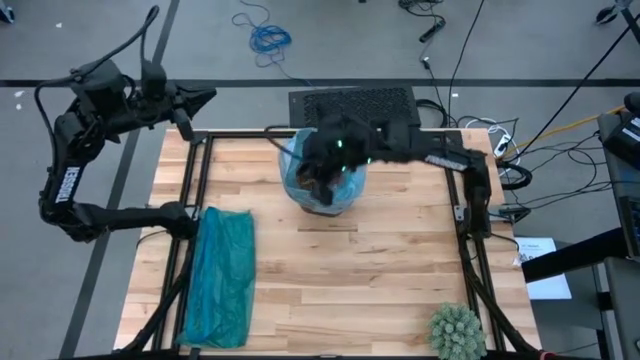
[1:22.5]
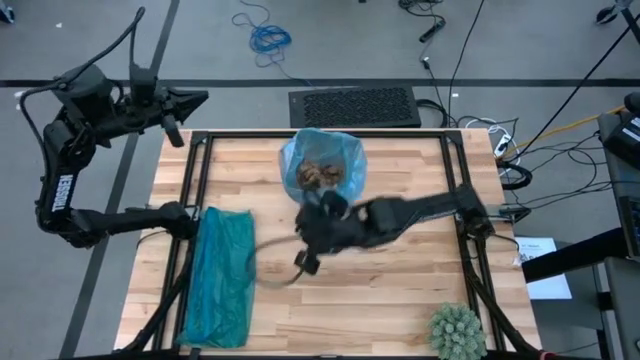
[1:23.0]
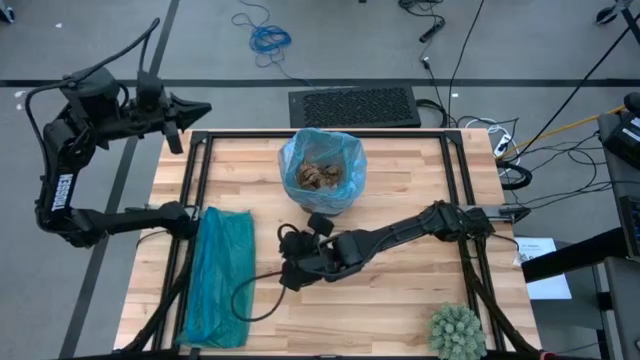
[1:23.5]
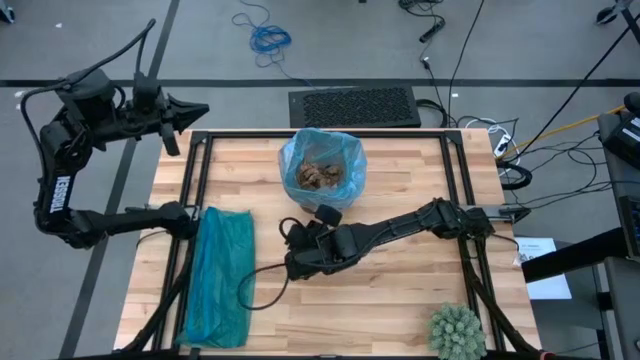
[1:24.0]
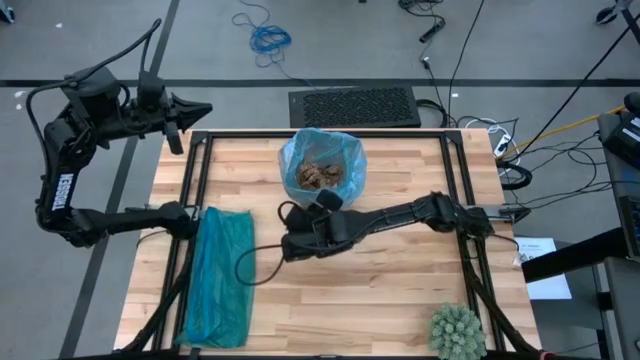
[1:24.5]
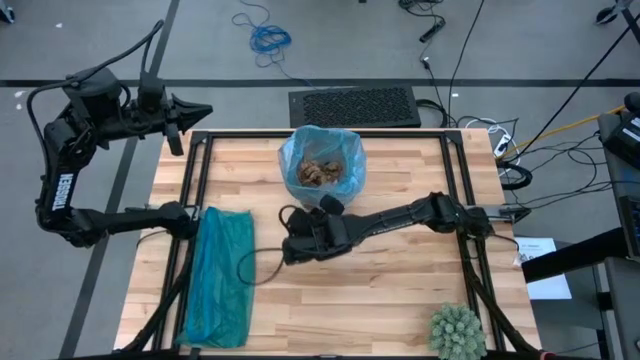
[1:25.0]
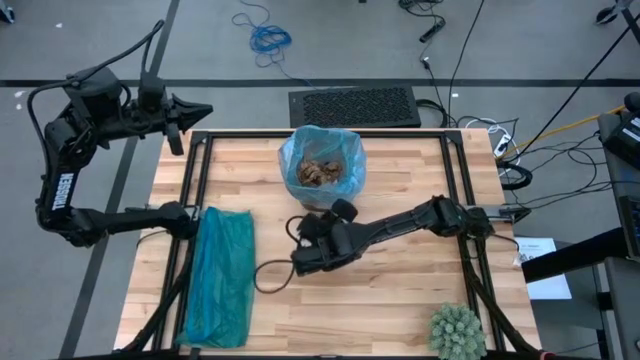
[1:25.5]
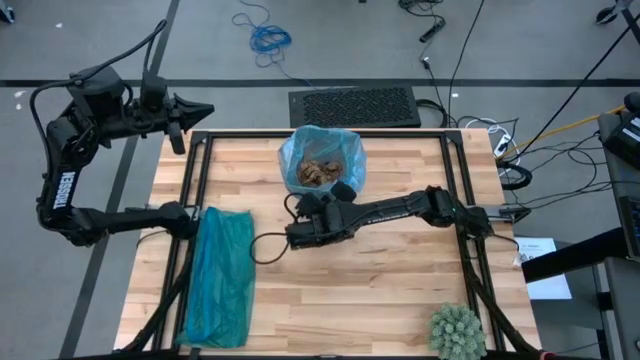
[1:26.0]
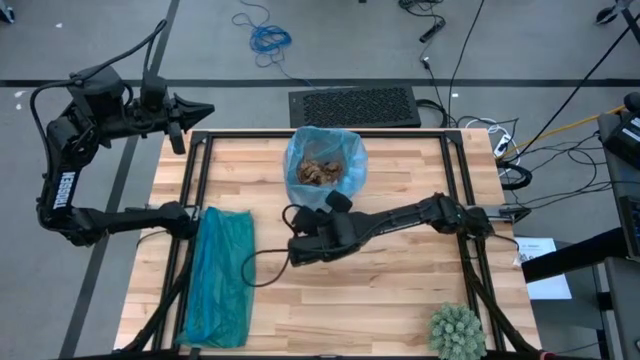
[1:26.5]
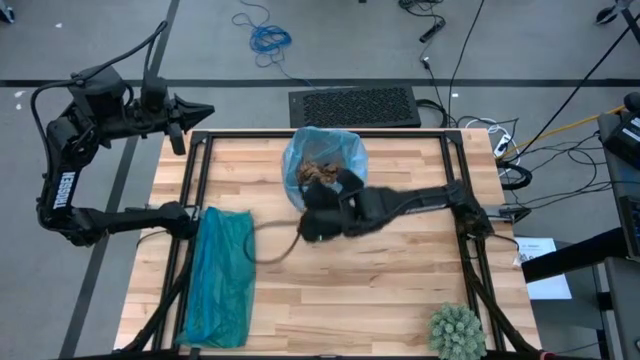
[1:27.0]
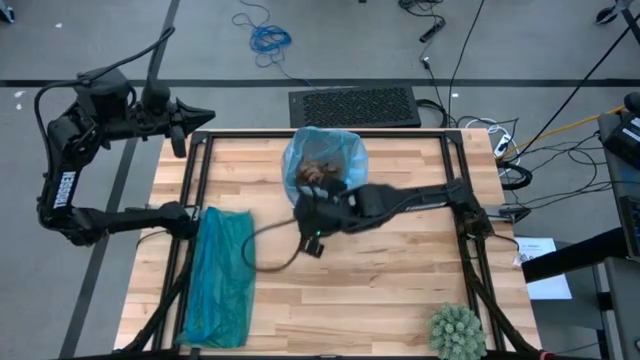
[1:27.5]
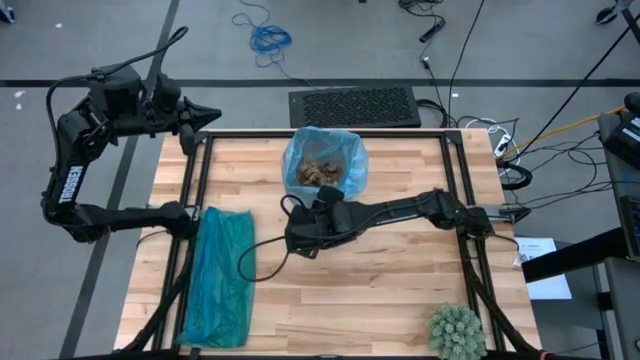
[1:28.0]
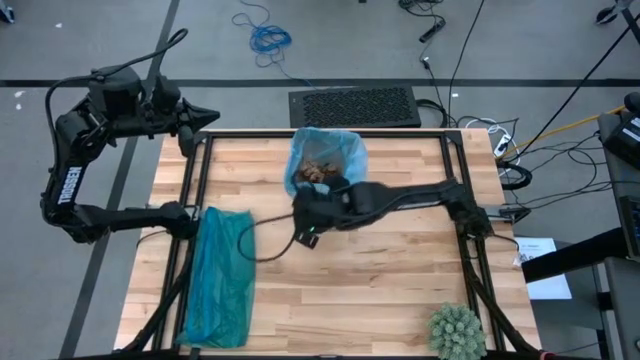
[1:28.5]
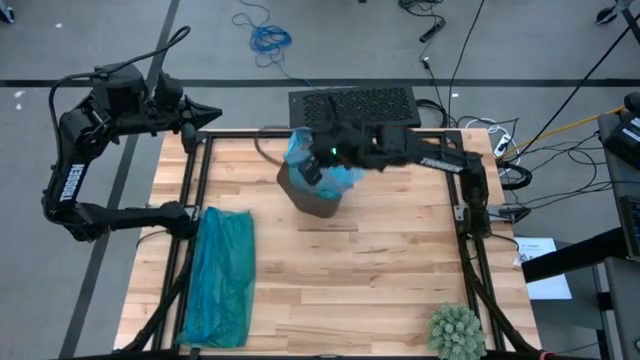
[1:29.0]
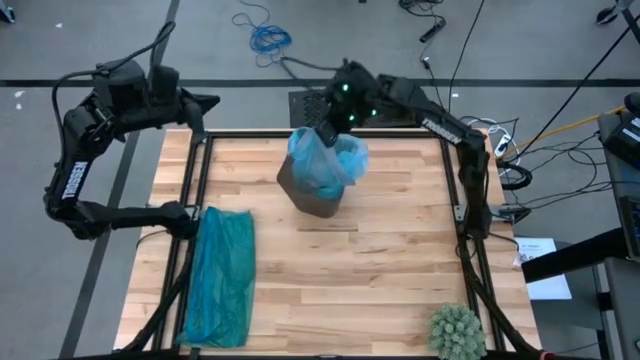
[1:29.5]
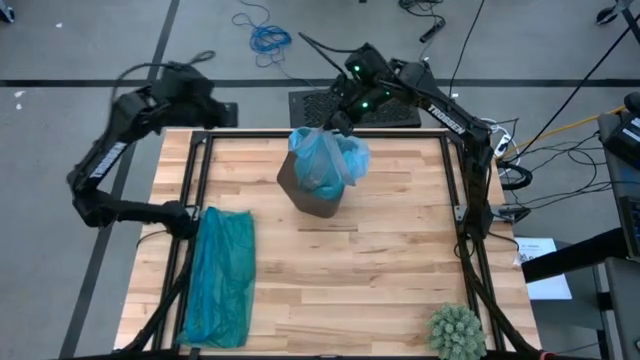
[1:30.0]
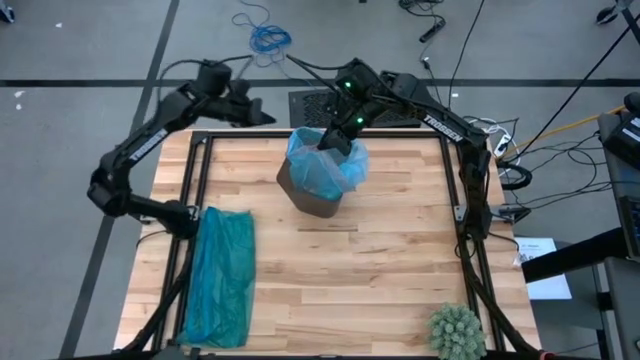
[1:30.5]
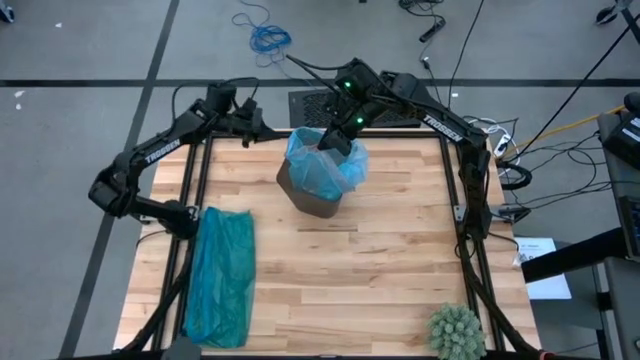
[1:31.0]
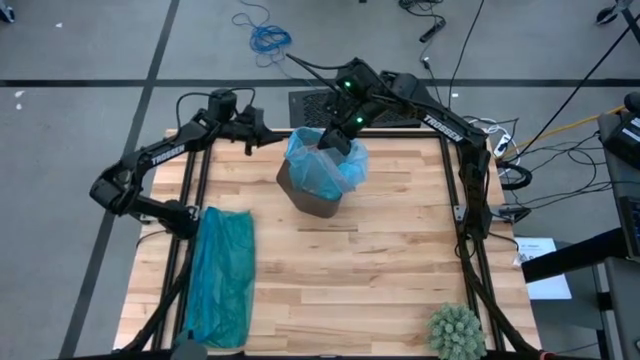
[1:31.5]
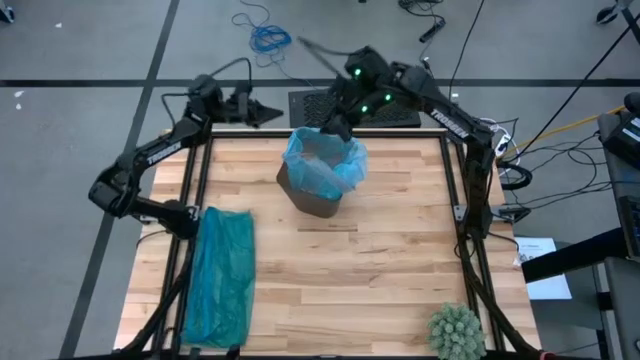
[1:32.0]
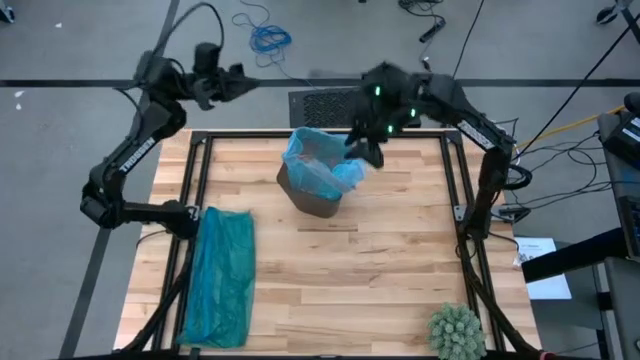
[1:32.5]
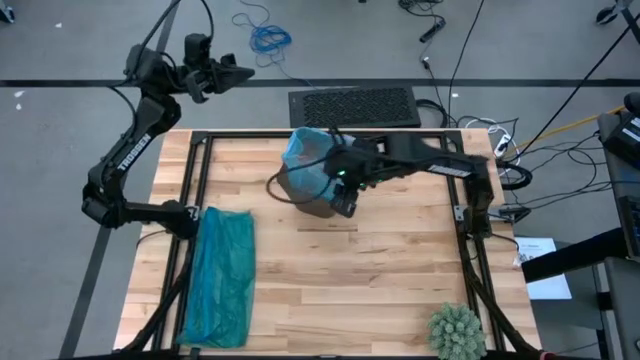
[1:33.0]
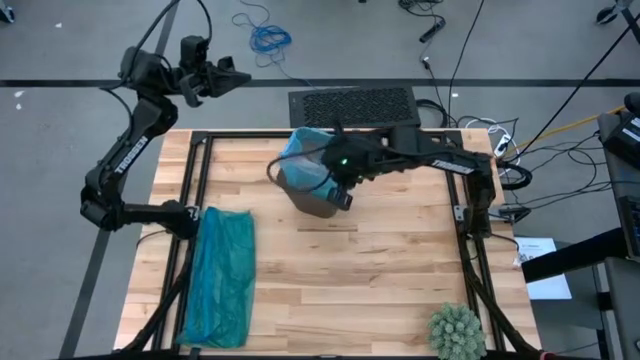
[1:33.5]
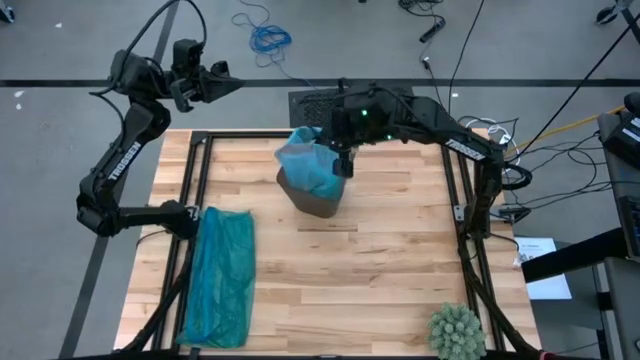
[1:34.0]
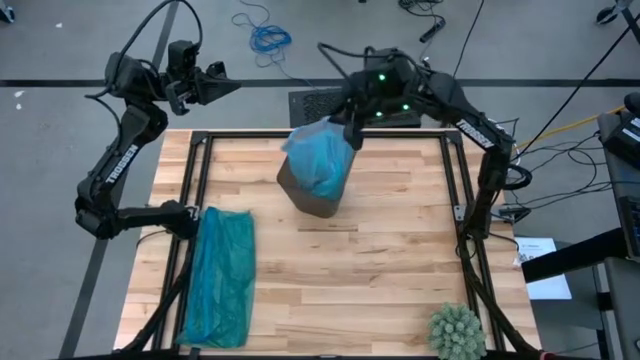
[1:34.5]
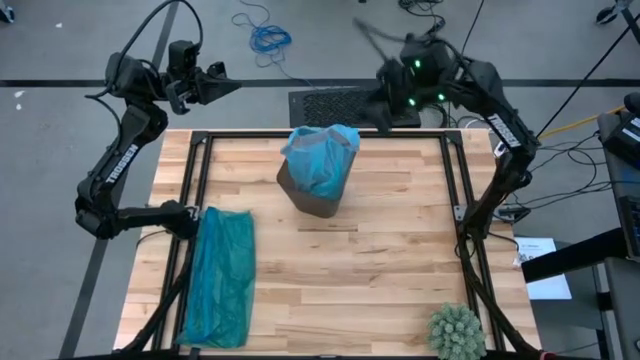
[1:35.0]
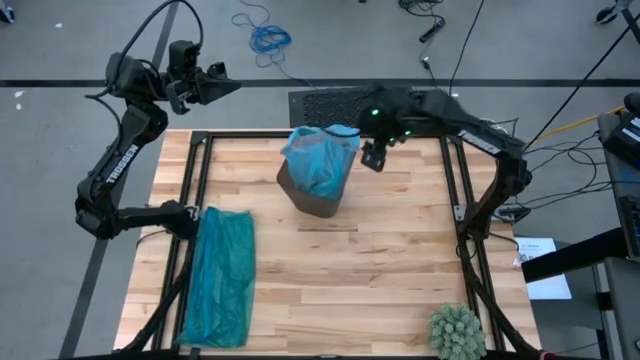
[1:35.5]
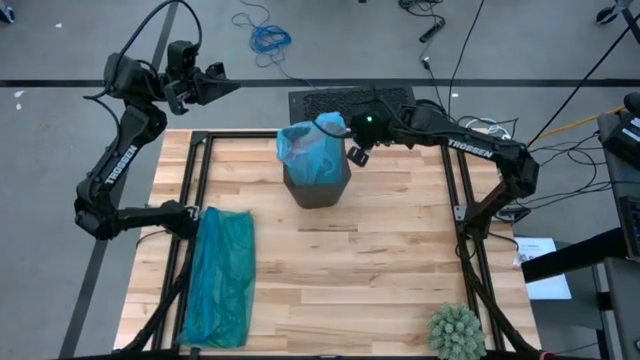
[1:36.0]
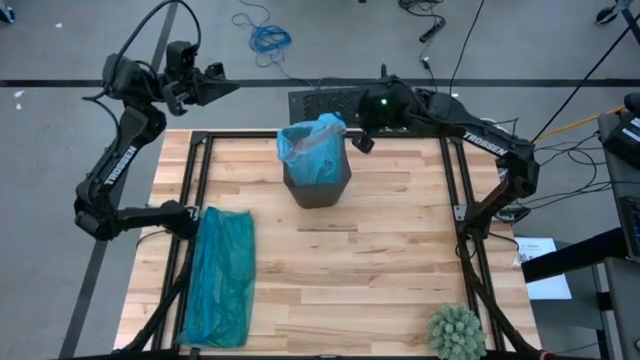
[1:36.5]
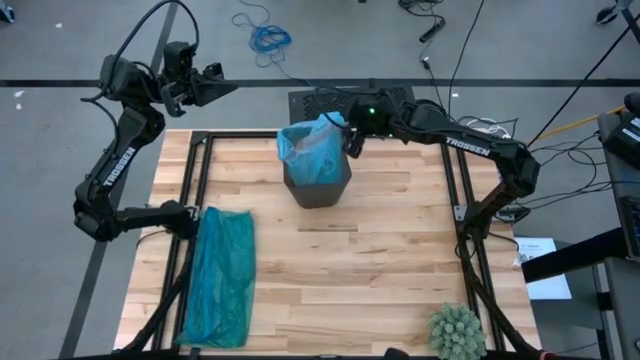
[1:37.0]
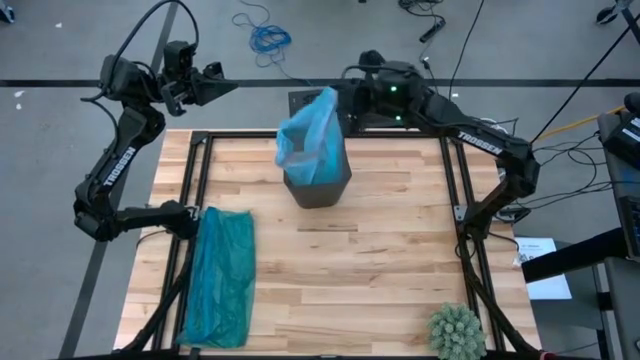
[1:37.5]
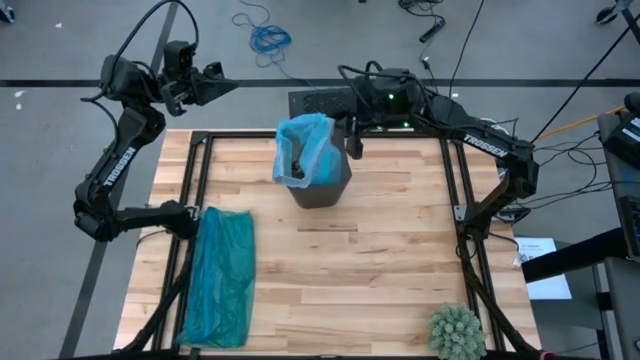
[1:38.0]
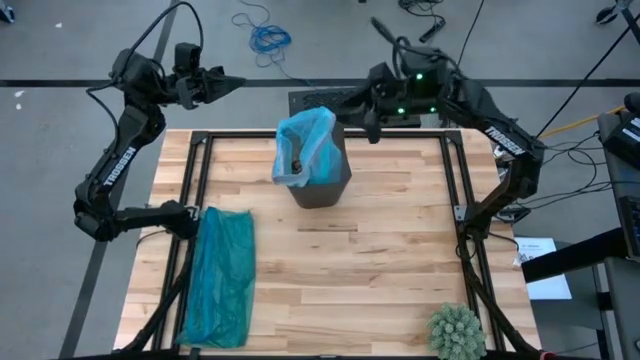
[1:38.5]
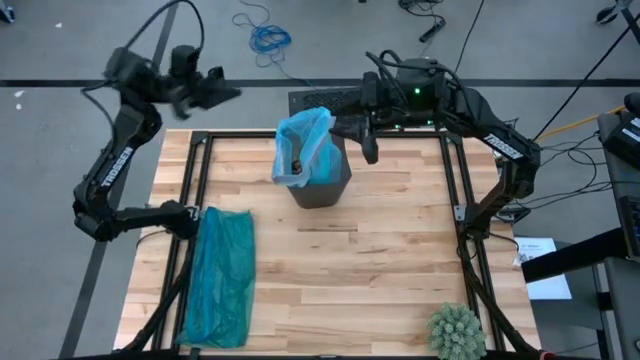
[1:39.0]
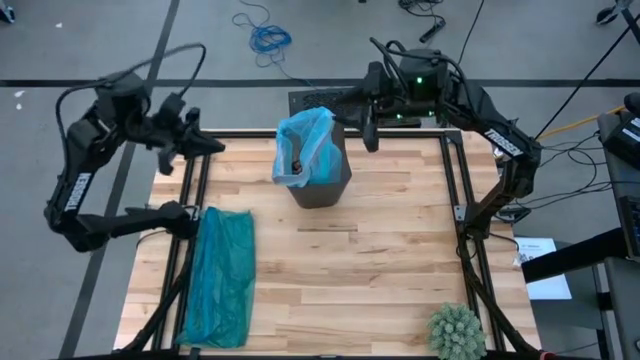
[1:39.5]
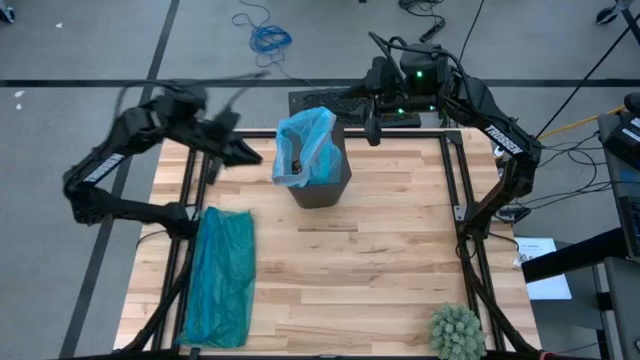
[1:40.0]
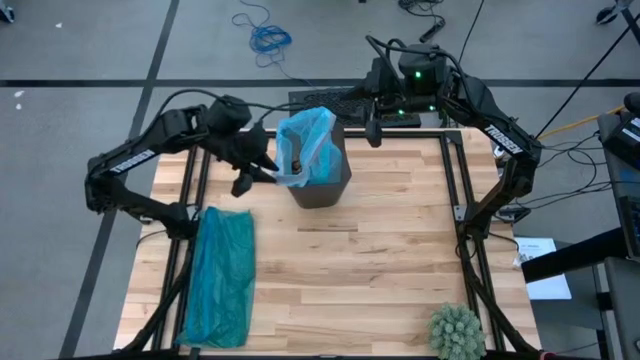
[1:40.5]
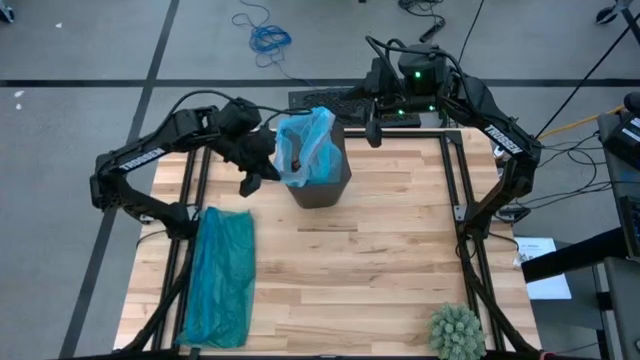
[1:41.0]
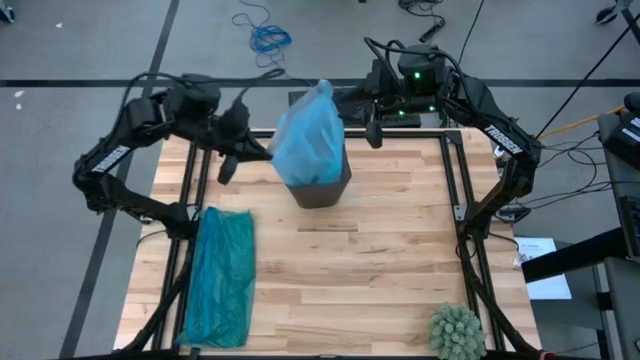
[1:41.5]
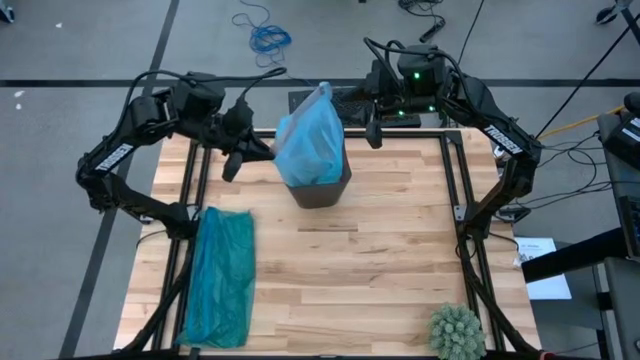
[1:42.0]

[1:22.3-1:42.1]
Task: place trash/remove bag and relplace
Close the blue trash bag in the trash bin

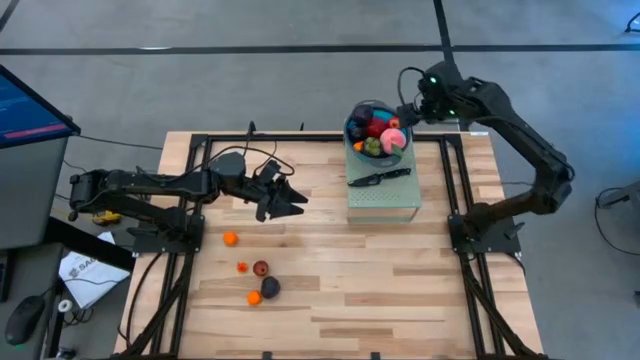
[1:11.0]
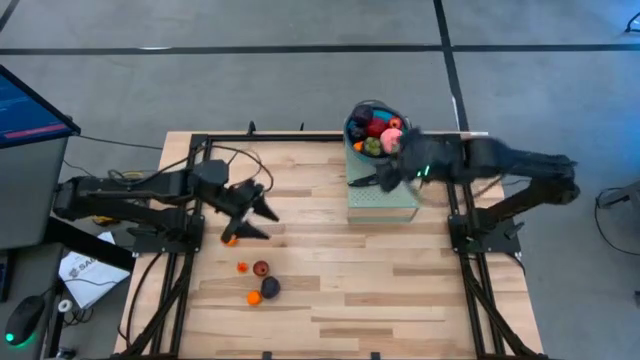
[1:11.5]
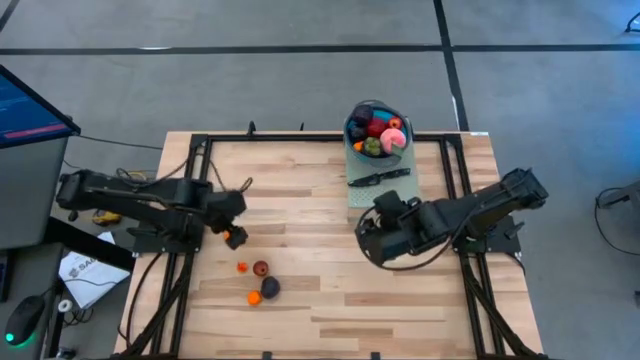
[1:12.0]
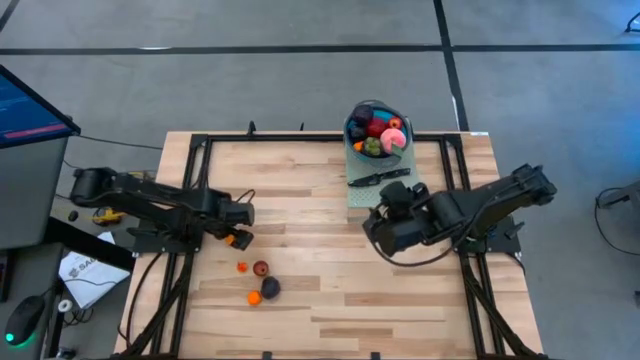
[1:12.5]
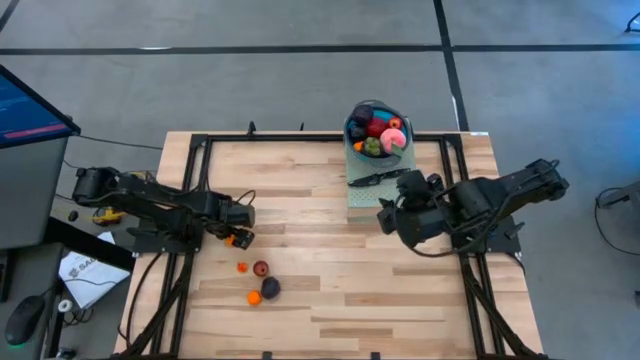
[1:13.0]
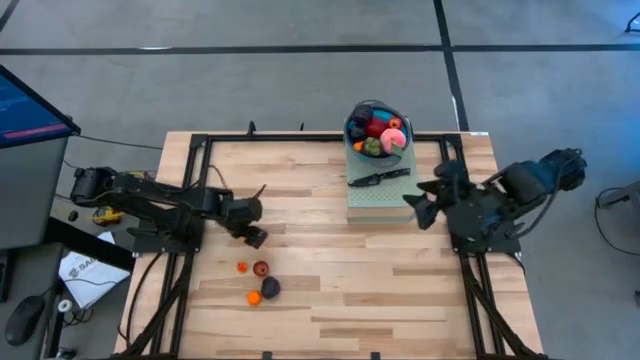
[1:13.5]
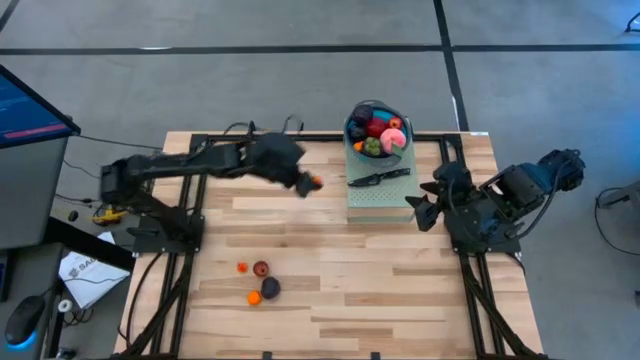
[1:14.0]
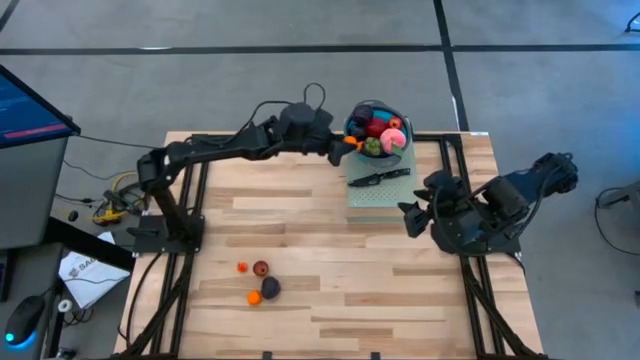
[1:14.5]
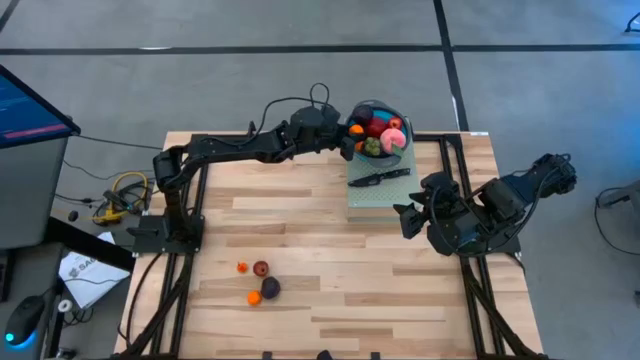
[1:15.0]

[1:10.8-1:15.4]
Task: Pick & Place Fruit
Put the top tangerine into the blue strainer bowl on the shelf
